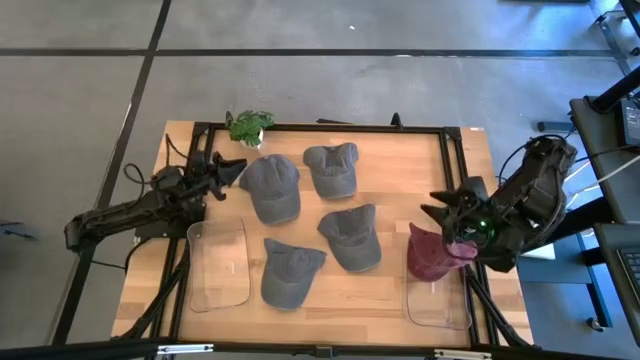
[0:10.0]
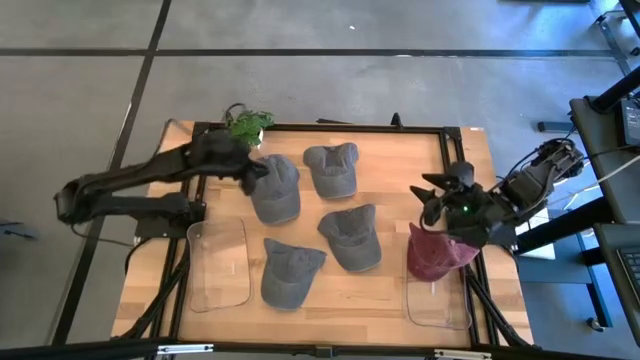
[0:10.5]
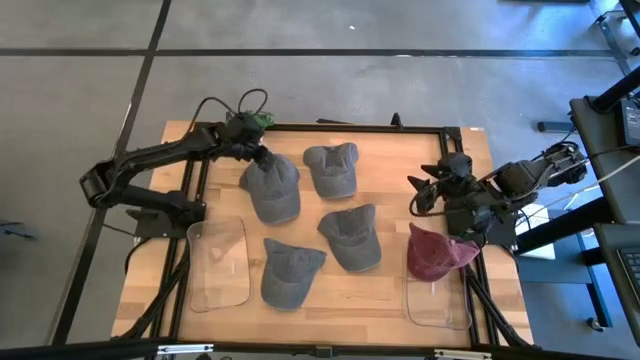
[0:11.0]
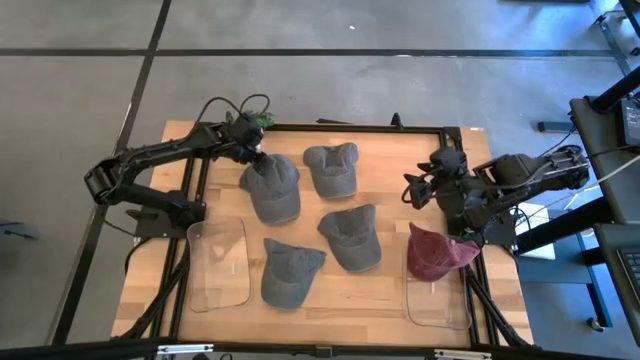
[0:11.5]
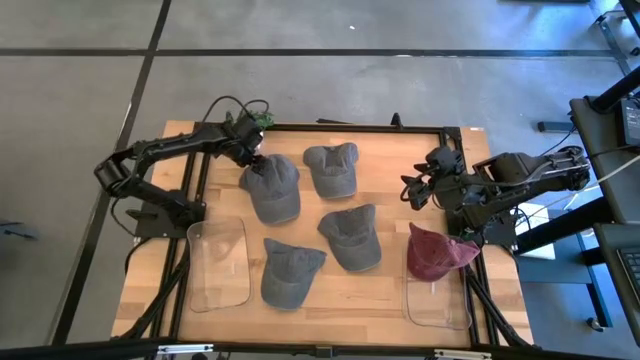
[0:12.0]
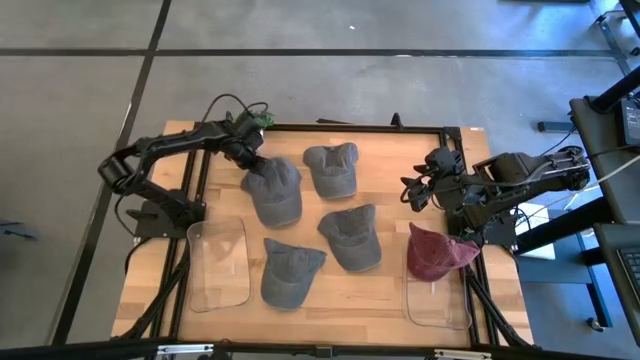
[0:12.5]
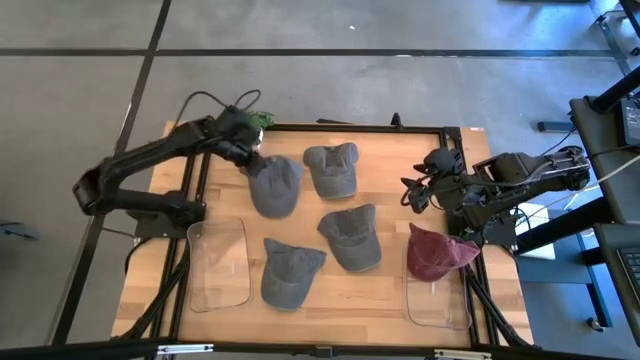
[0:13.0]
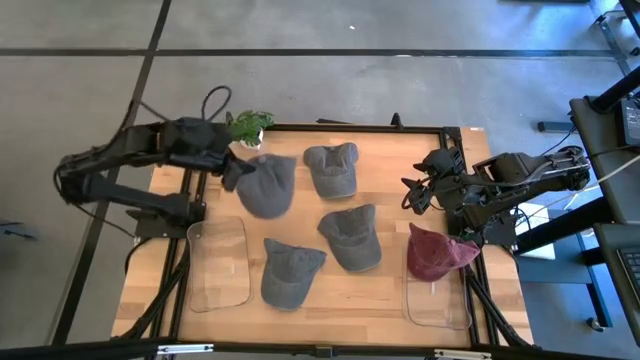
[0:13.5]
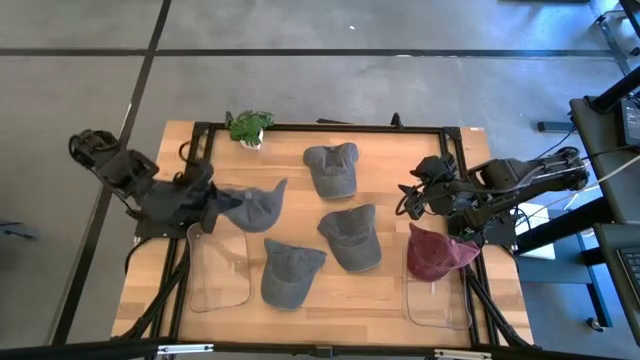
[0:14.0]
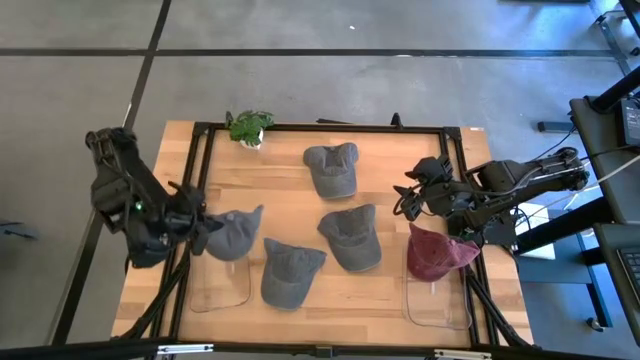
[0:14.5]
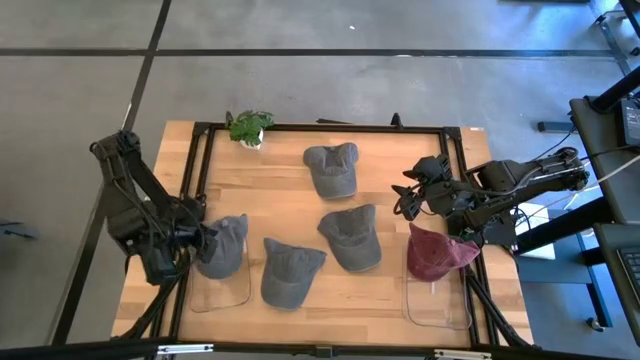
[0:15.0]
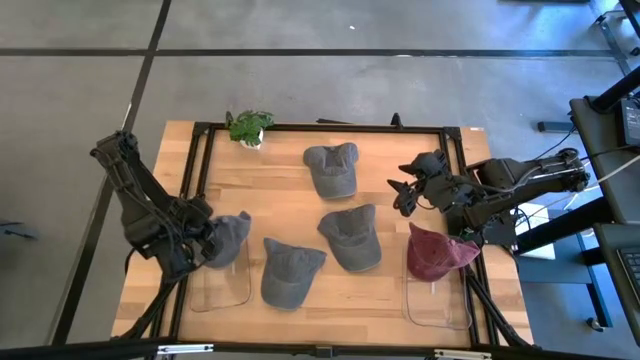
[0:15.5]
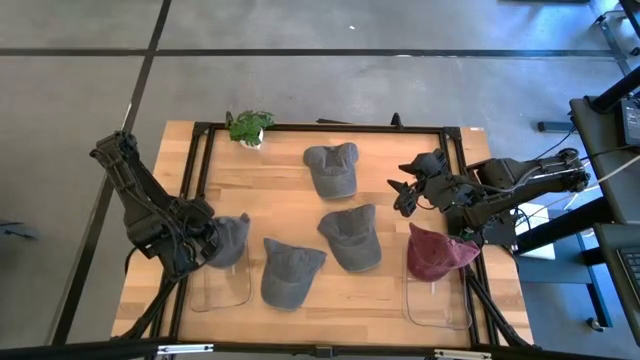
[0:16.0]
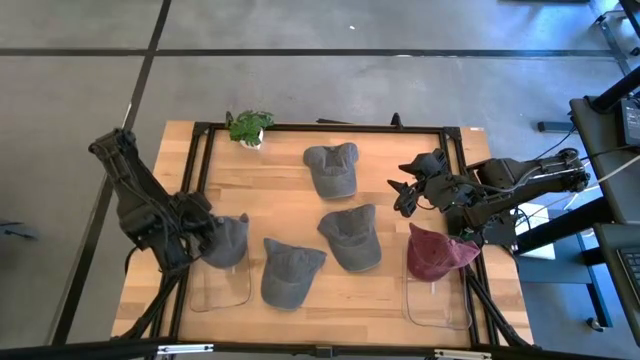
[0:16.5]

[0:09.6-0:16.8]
Task: Pick & Place hat
Put the dark blue cap into the left transparent bin

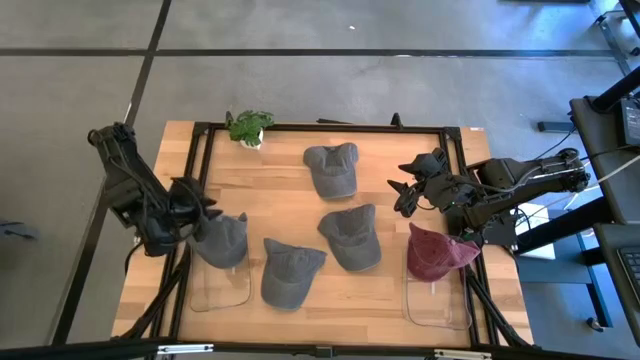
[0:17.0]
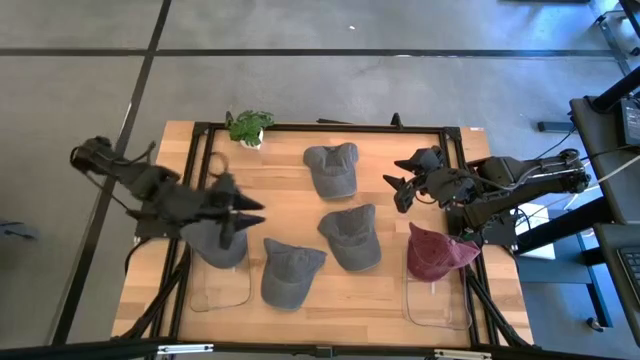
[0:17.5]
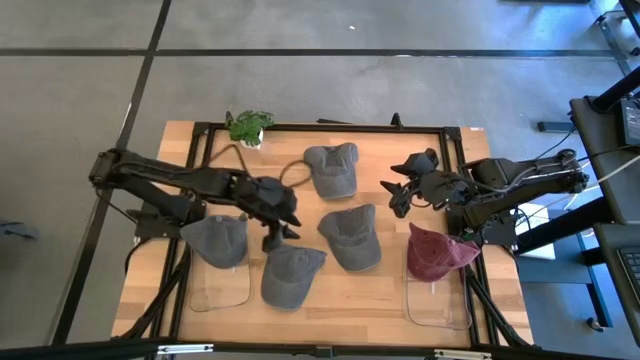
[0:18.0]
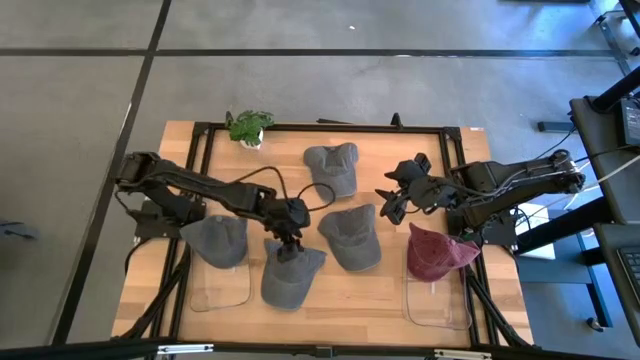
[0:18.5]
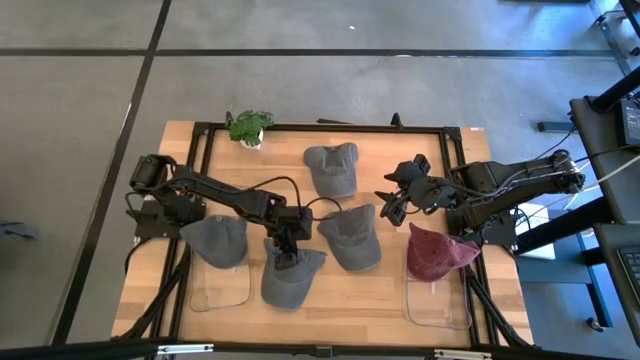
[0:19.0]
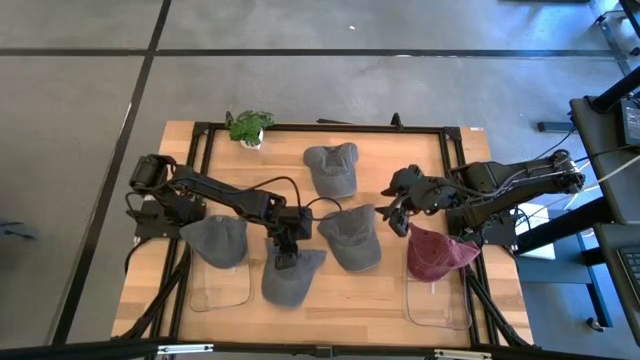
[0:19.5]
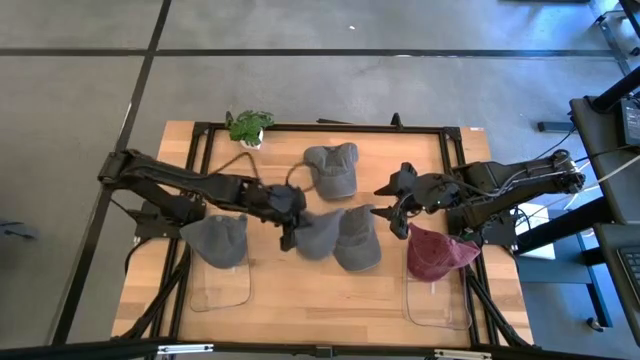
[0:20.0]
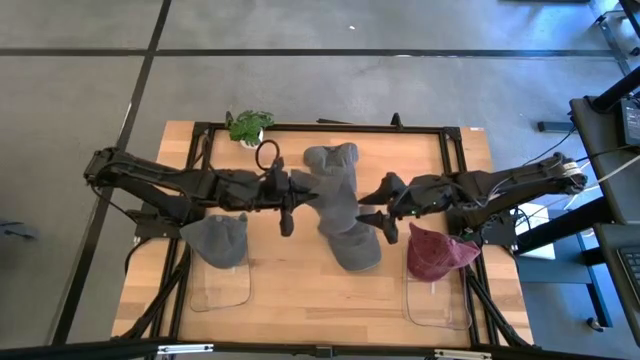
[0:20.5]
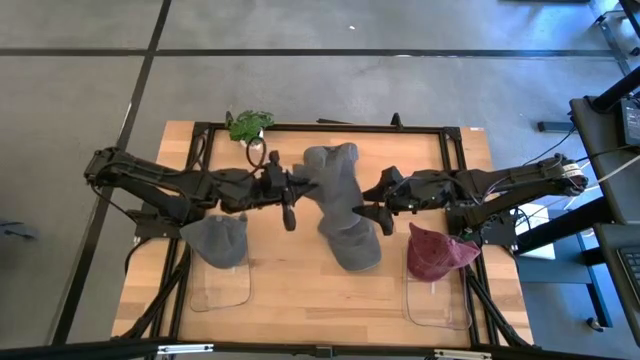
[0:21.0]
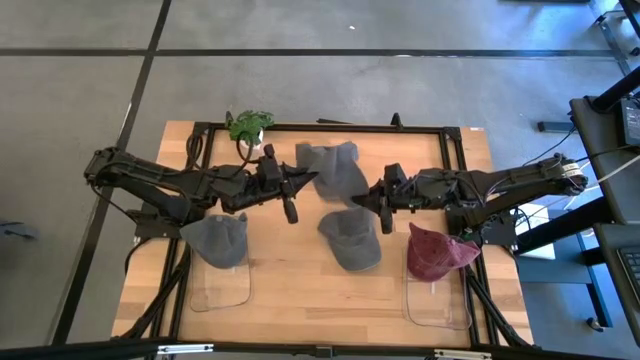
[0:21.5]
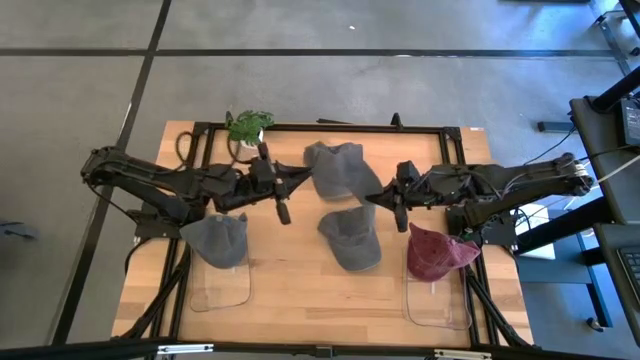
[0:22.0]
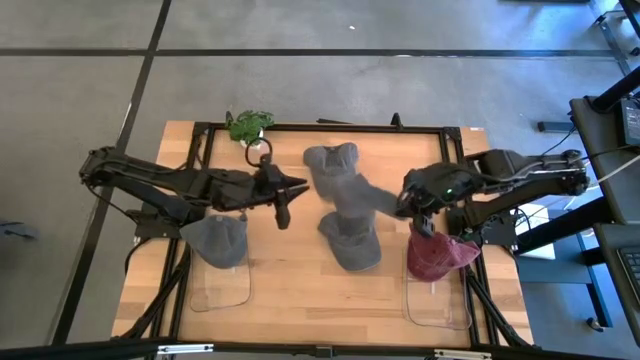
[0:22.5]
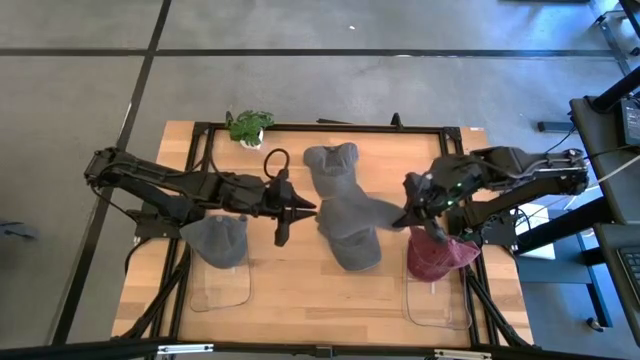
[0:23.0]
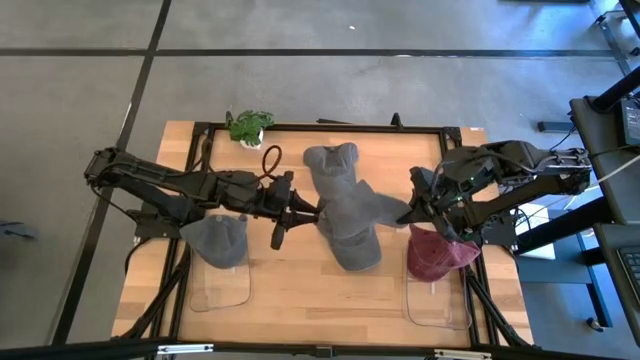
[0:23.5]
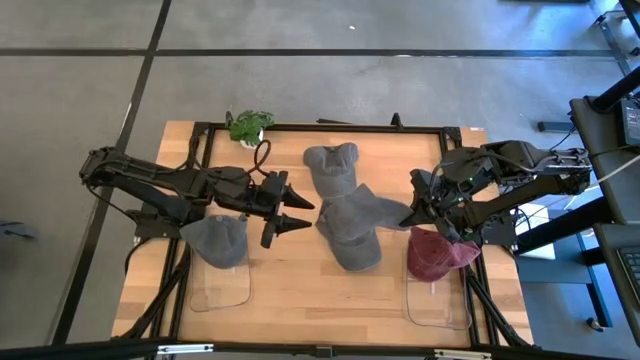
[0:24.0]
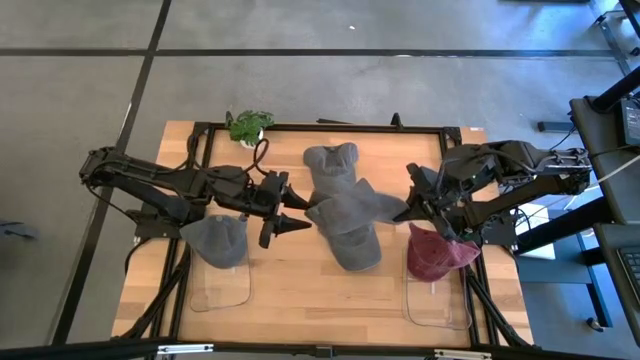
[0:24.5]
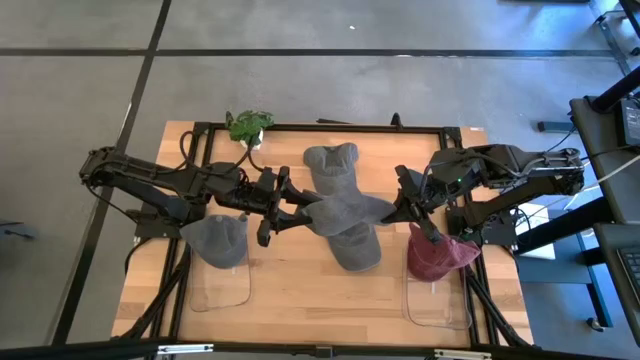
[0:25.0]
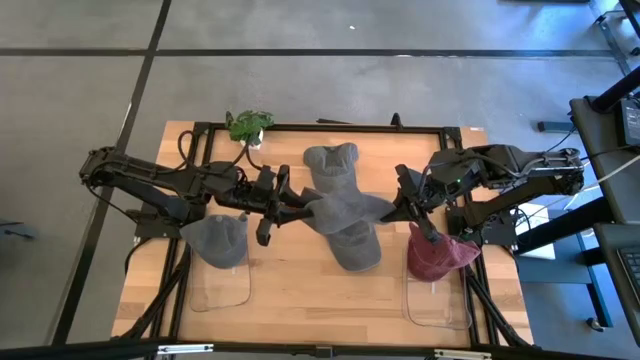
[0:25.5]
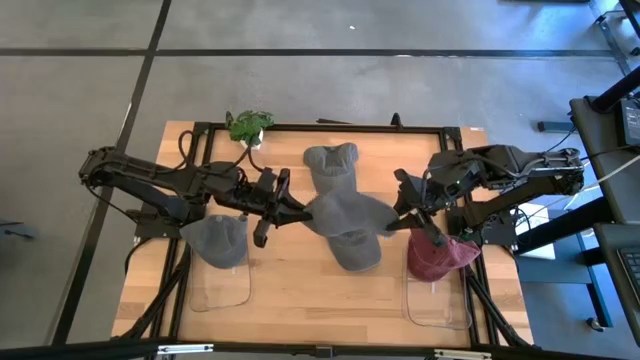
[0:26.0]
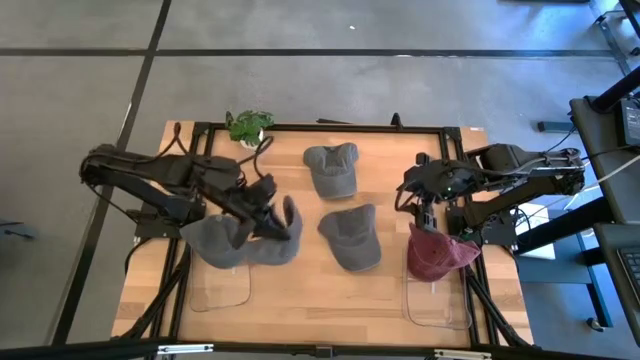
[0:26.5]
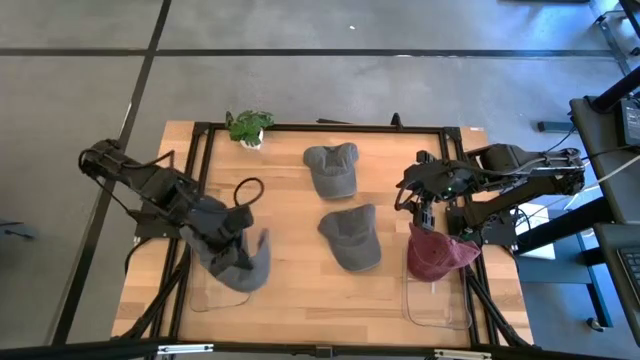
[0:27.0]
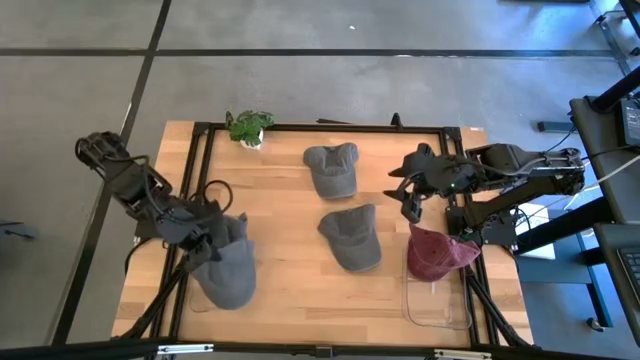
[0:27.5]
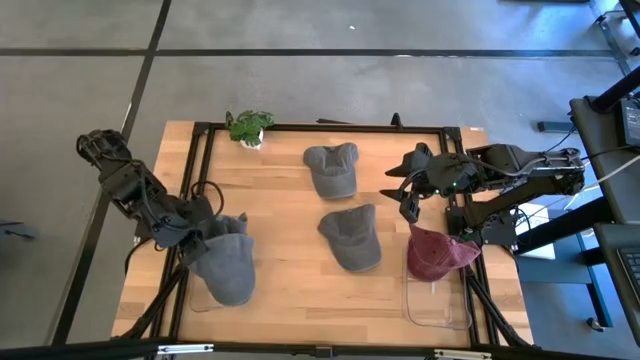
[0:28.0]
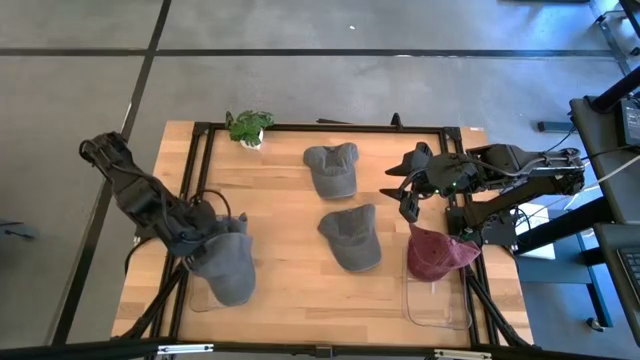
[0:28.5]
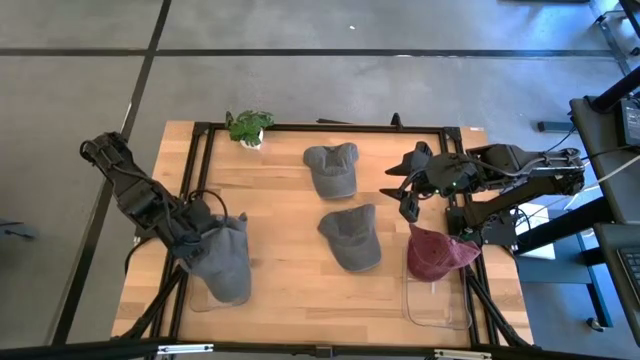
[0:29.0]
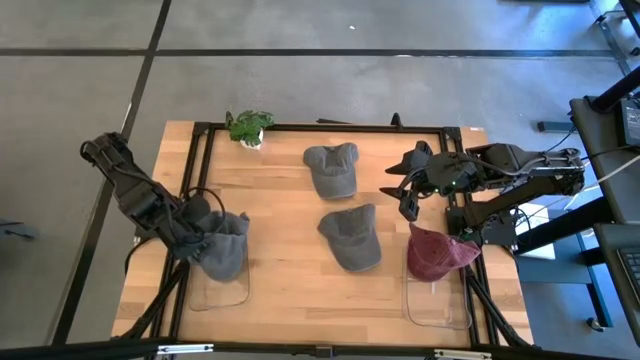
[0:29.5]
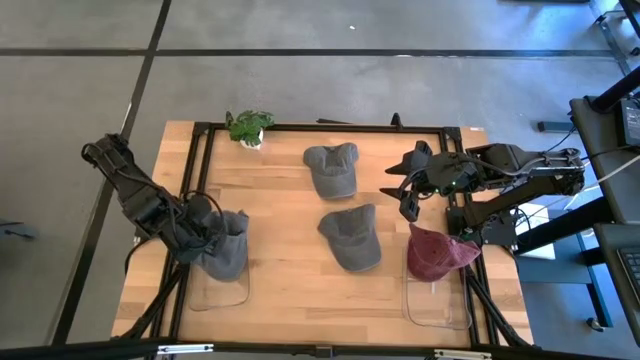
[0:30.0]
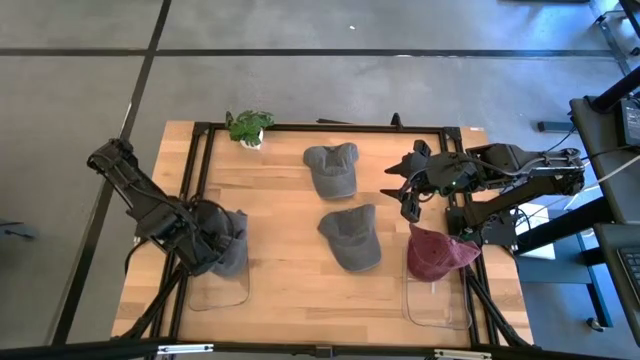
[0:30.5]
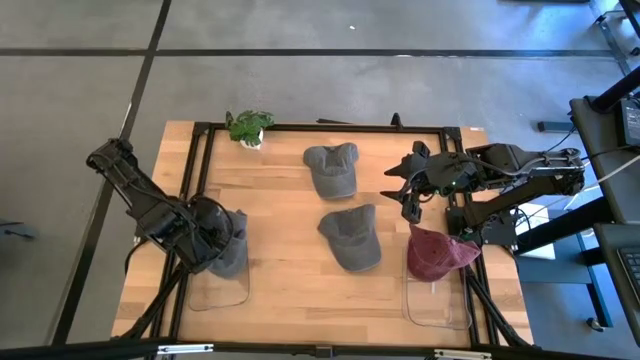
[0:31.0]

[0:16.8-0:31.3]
Put the dark blue cap into the left transparent bin
